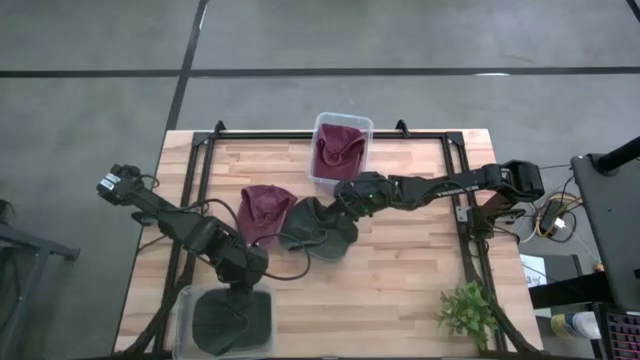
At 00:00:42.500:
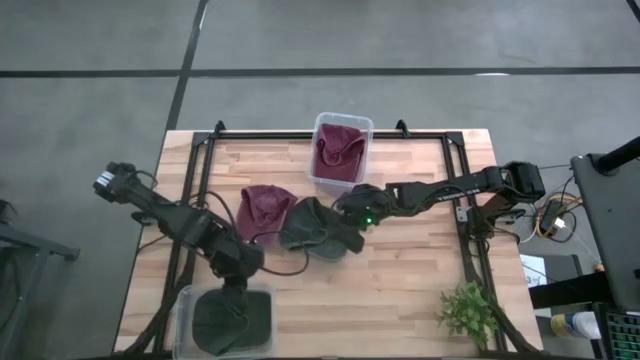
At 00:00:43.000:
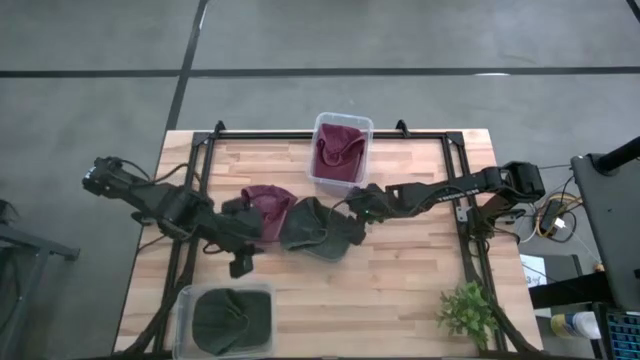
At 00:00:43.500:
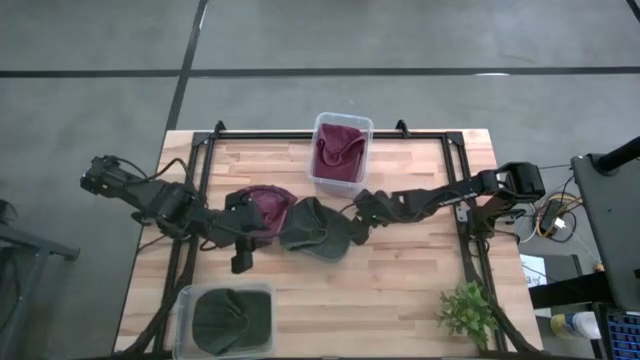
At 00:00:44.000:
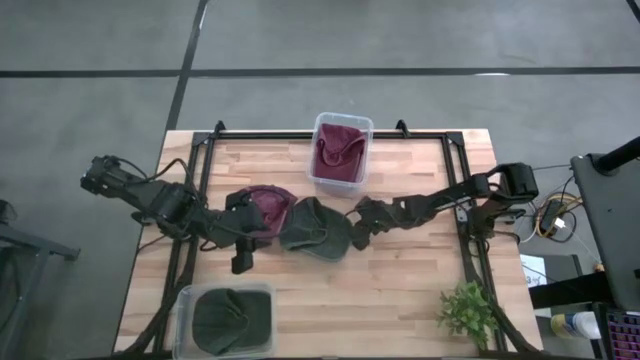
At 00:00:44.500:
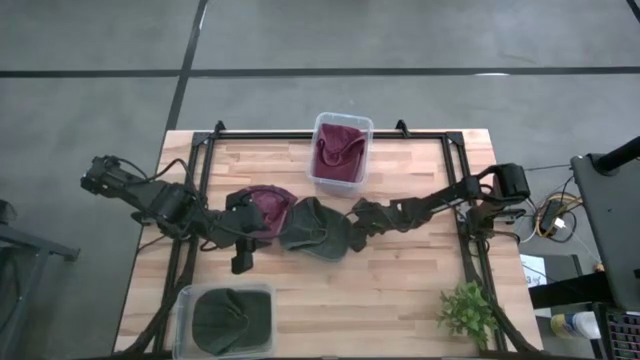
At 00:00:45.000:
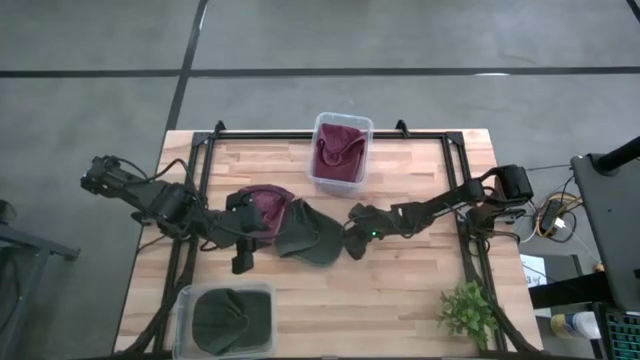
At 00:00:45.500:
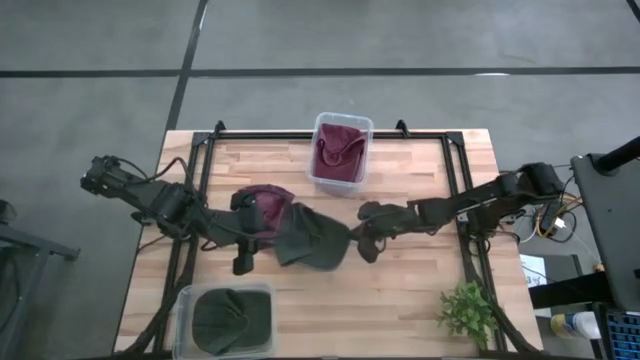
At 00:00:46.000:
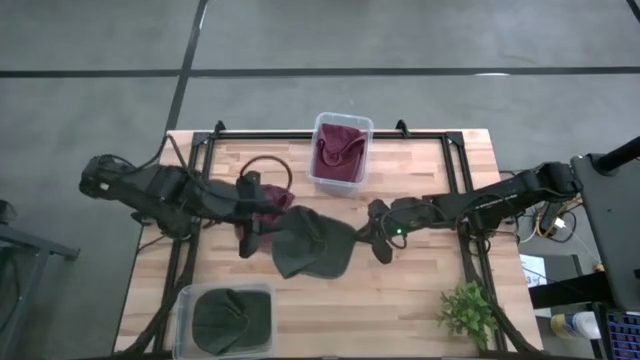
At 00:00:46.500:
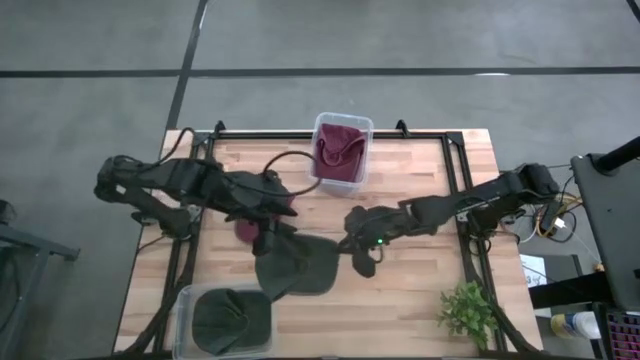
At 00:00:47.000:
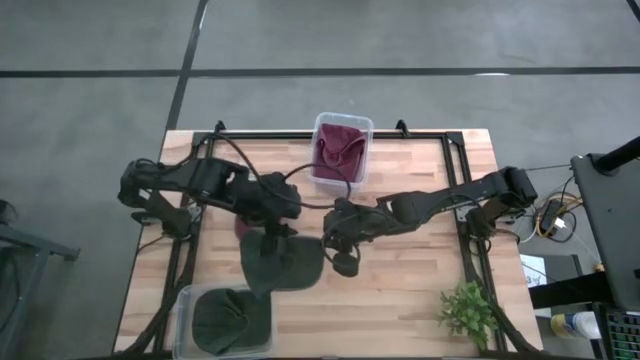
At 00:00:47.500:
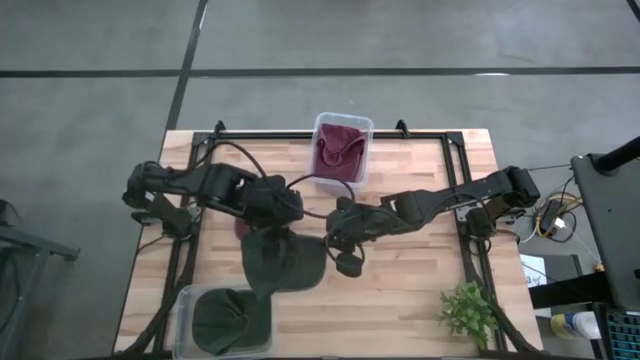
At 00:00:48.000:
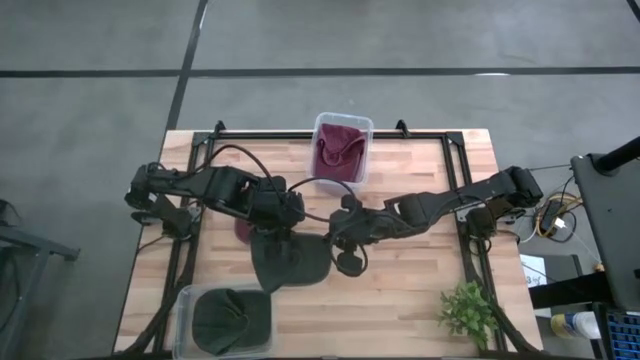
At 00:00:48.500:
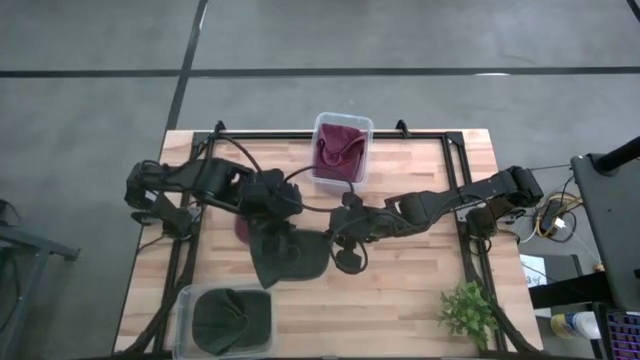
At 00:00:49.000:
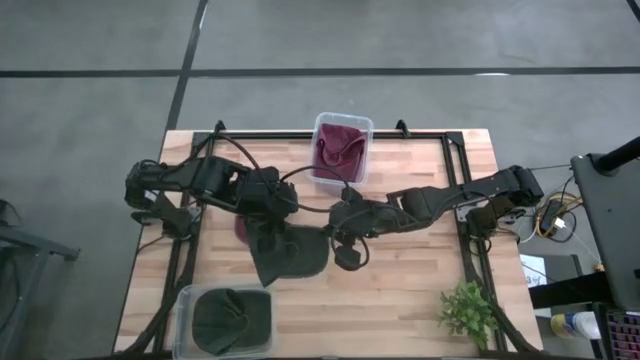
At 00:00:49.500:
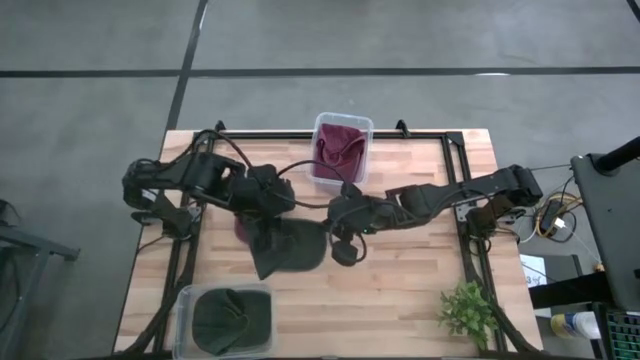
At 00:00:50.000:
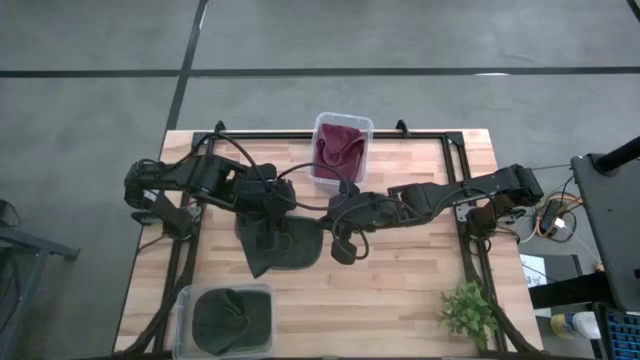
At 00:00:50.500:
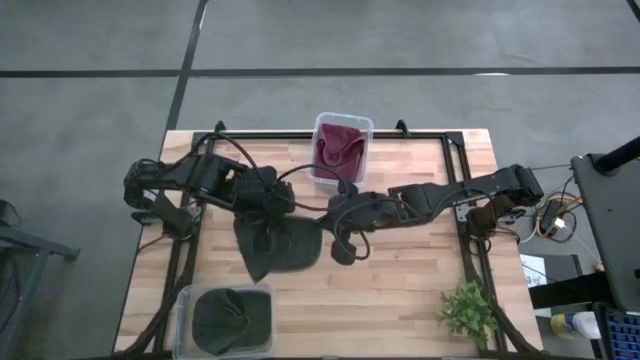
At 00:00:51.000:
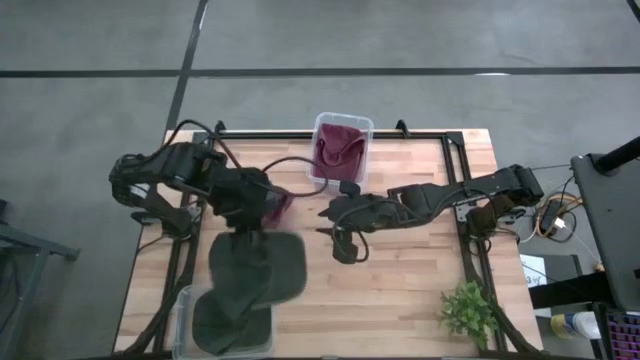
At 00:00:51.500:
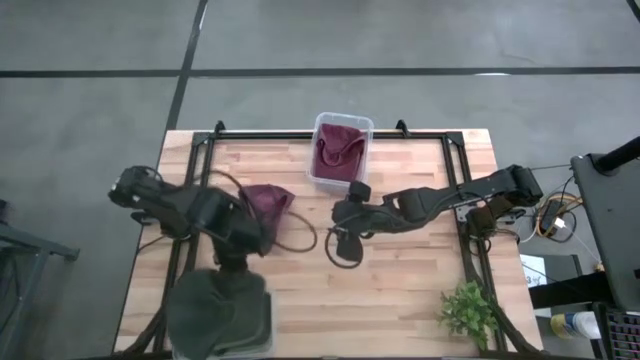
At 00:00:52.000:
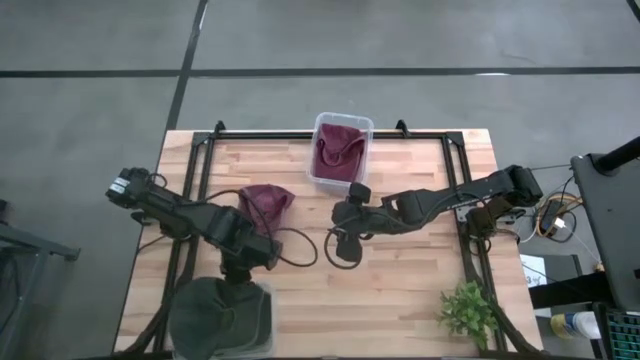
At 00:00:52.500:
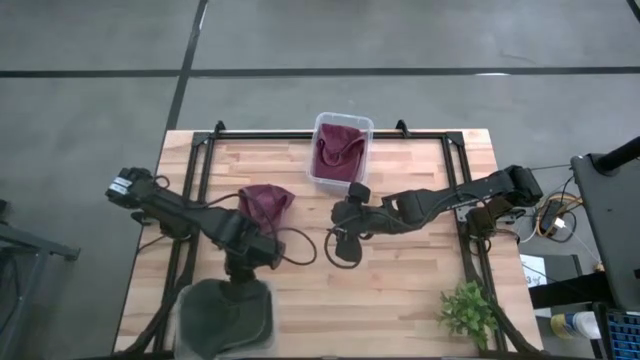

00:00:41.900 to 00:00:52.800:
Task: Pick & Place hat
Put the black cap into the bottom transparent bin

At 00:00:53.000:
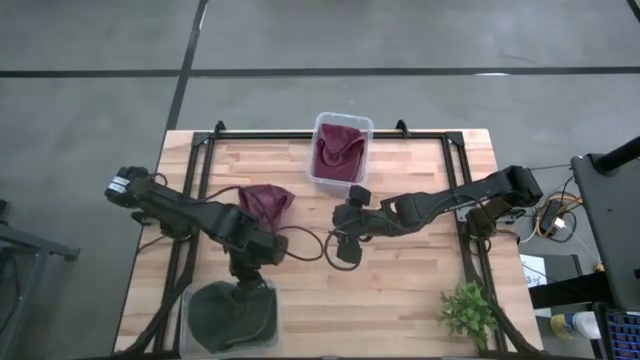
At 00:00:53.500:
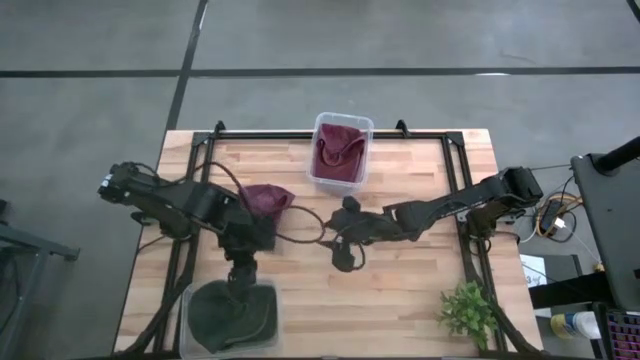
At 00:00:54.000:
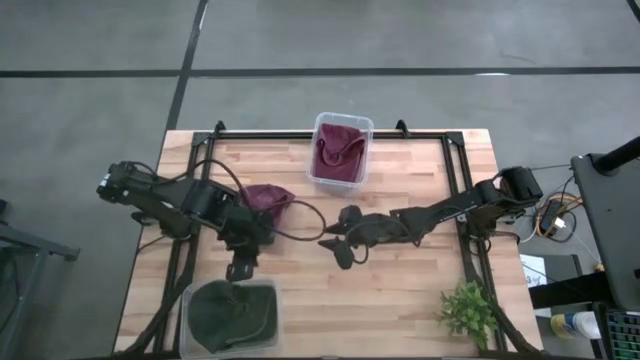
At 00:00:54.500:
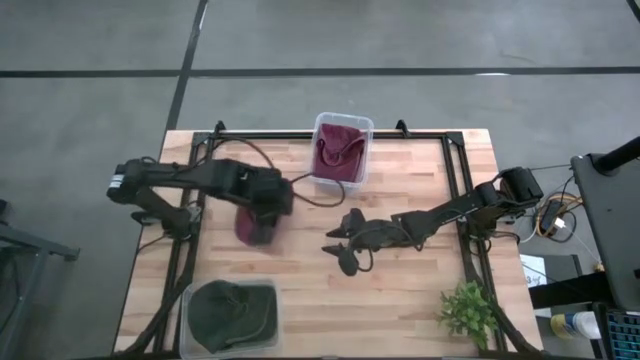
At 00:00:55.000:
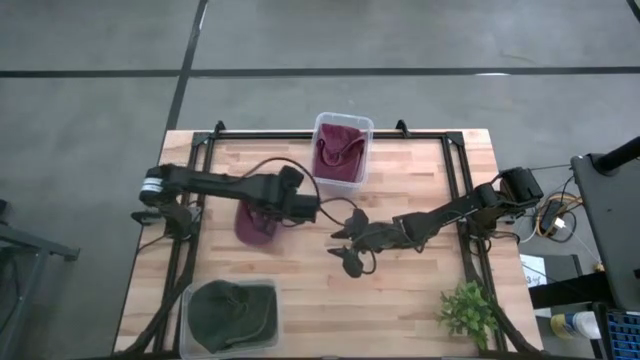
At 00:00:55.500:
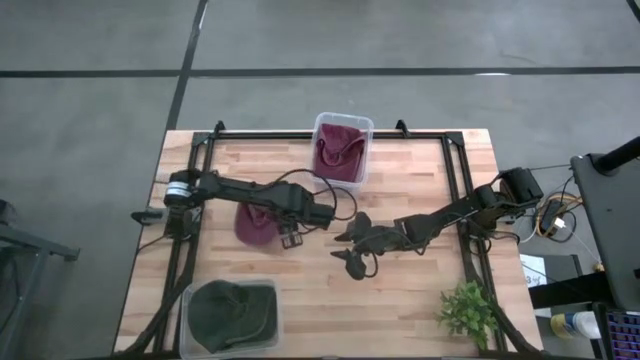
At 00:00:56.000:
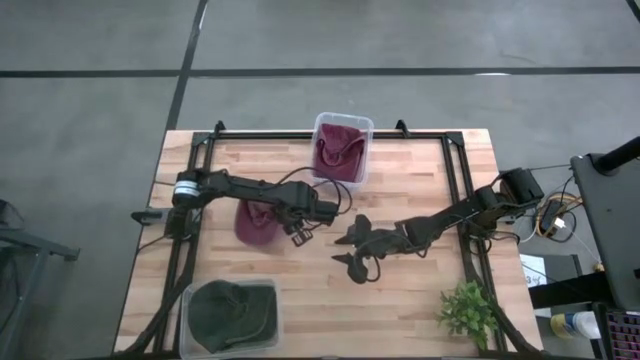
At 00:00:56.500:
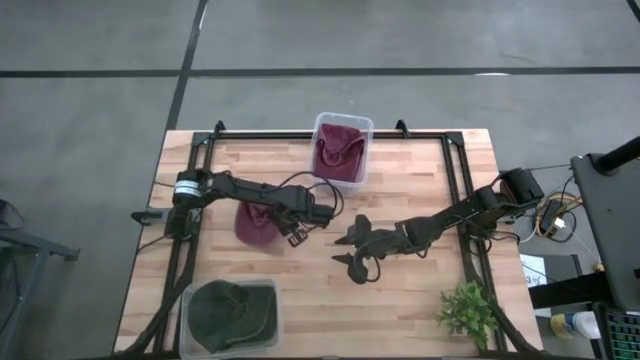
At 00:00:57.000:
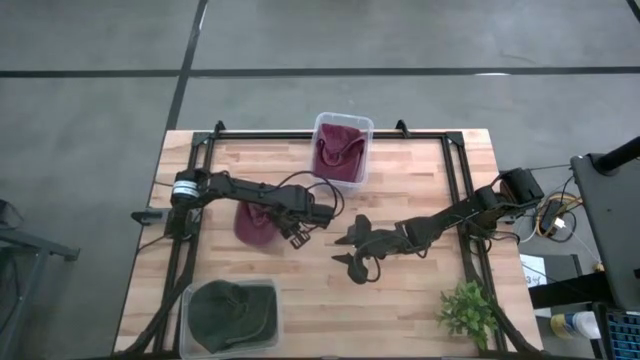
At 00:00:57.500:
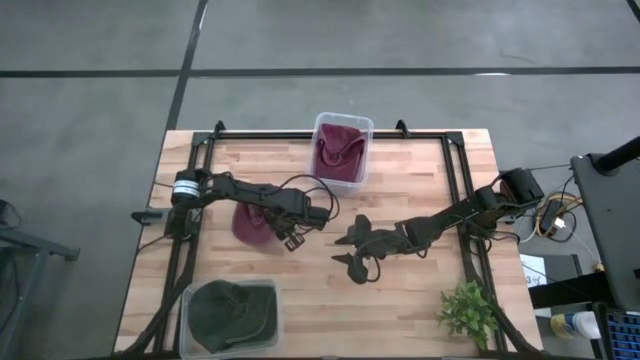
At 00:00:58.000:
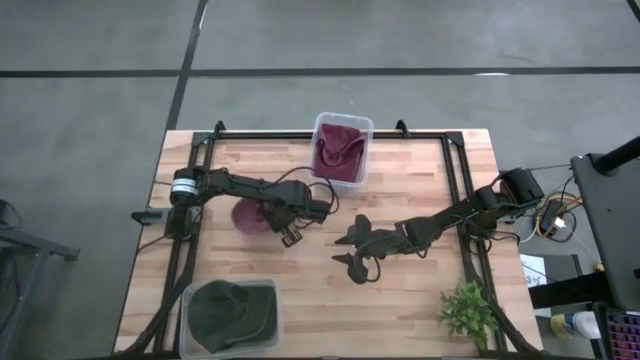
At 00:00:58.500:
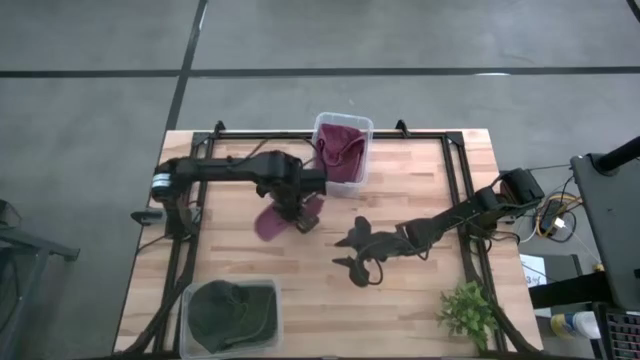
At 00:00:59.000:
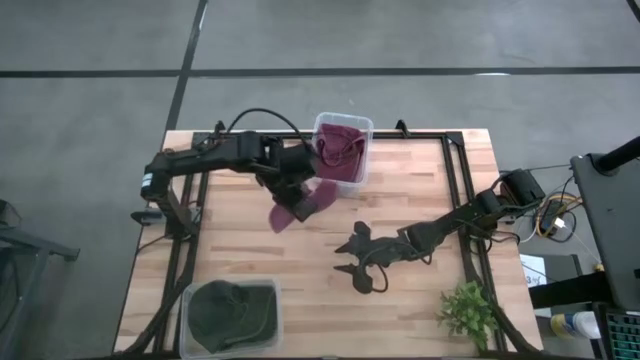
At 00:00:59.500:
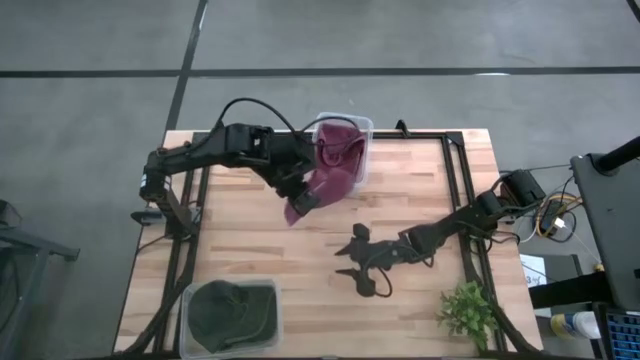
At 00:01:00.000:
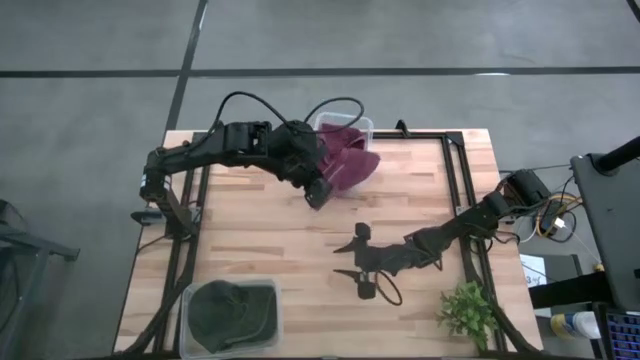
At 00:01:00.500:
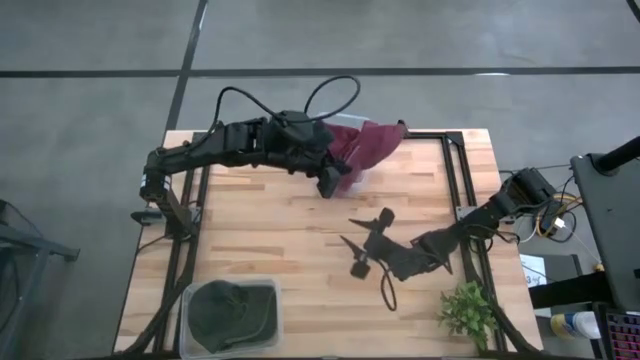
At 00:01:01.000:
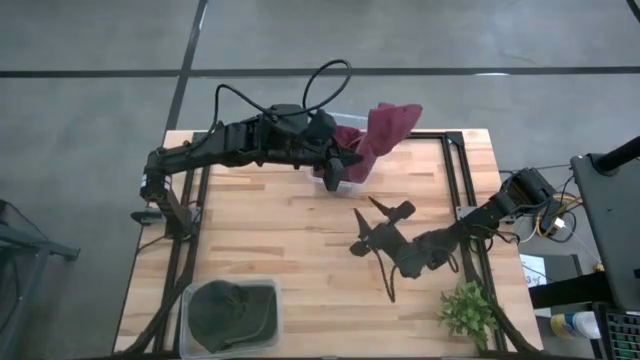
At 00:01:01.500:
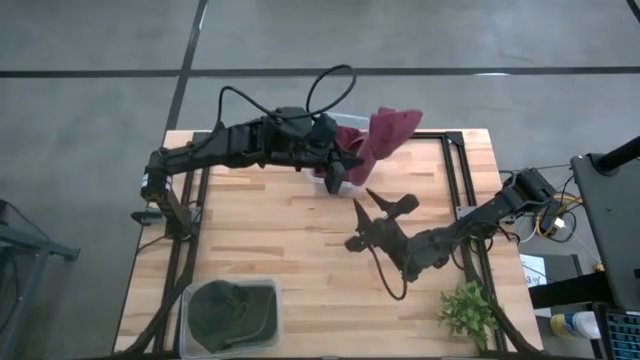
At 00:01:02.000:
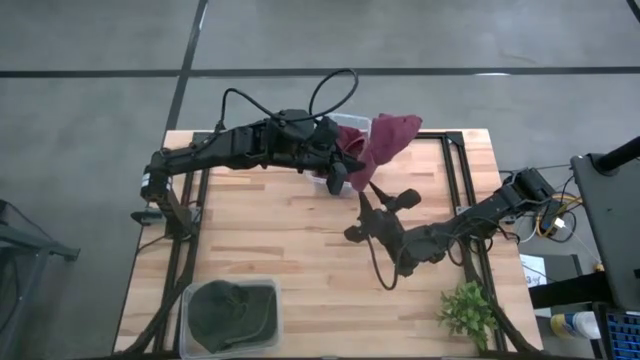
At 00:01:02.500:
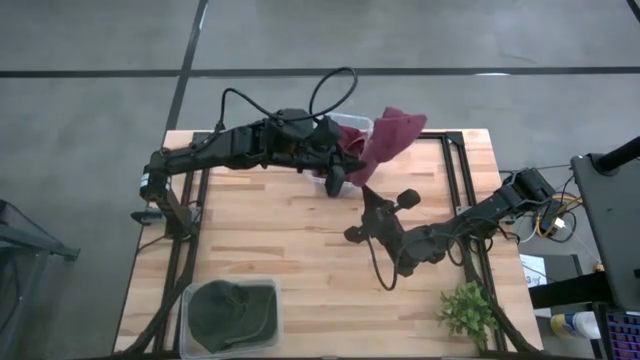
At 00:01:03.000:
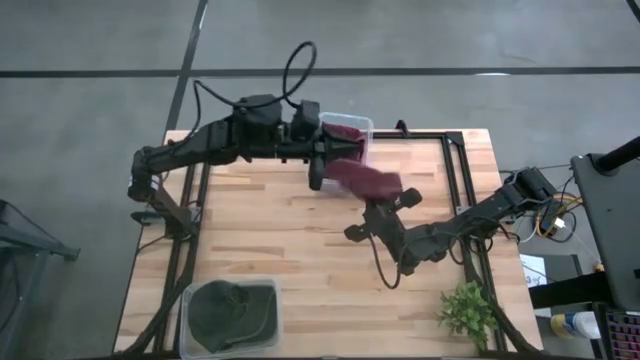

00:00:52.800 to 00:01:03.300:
Put the red cap into the top transparent bin
